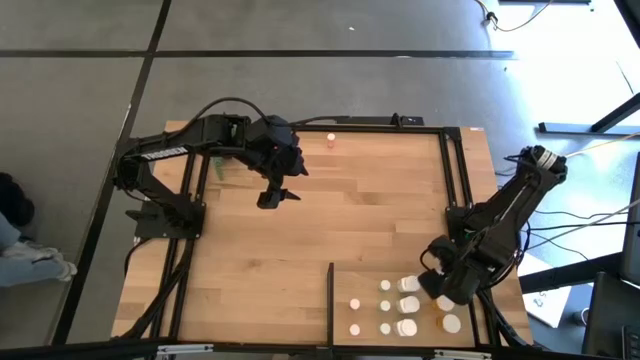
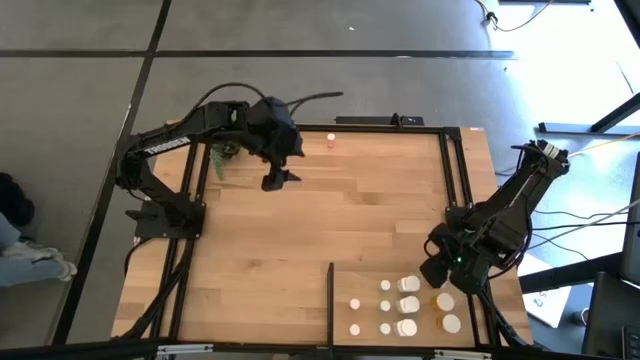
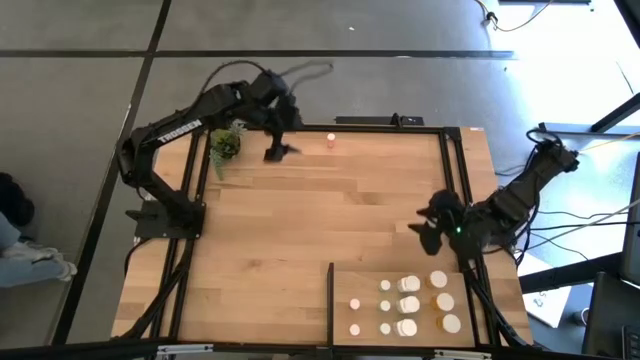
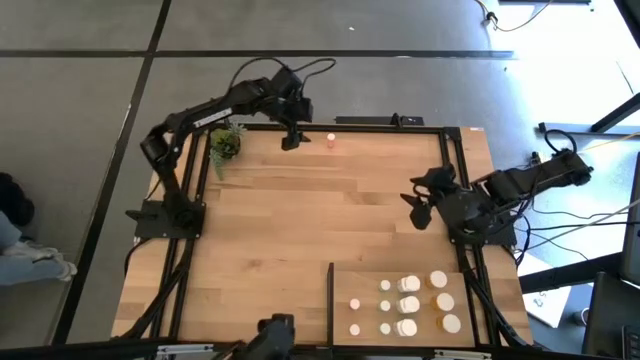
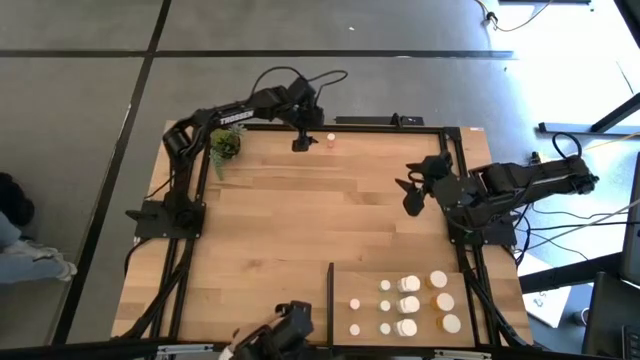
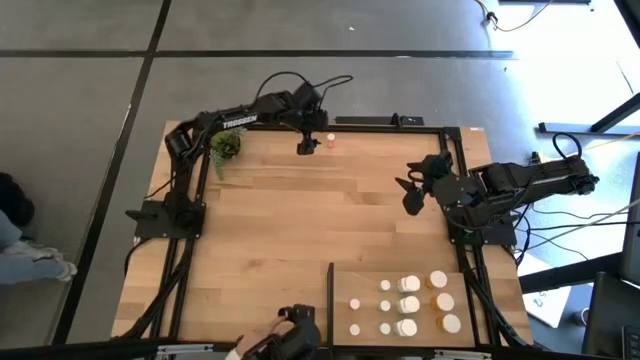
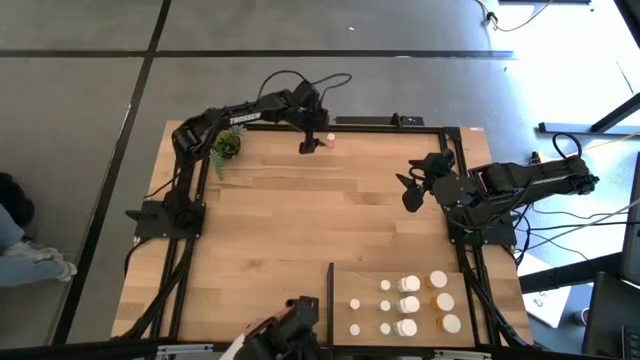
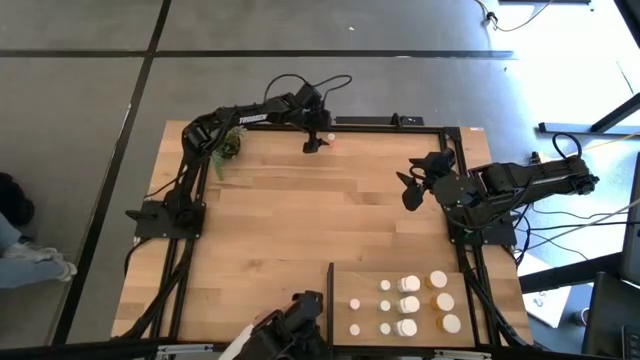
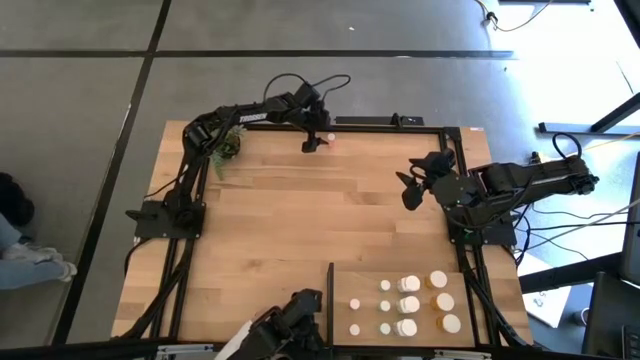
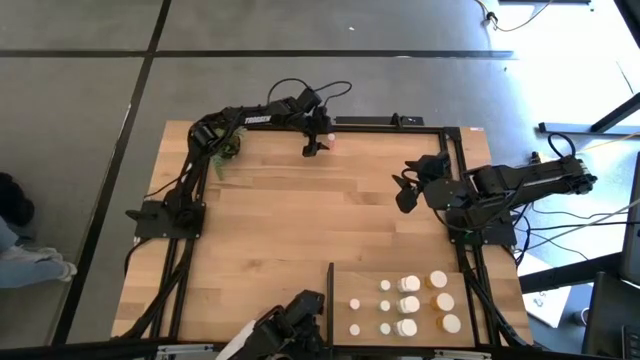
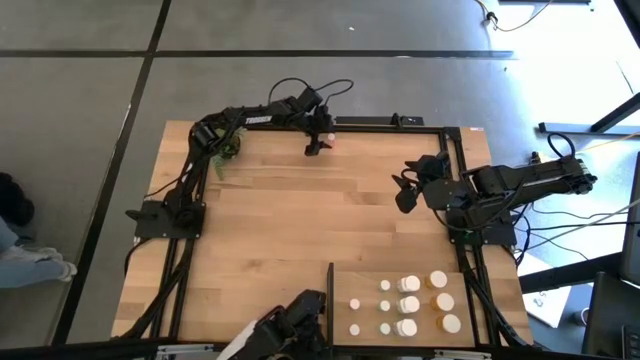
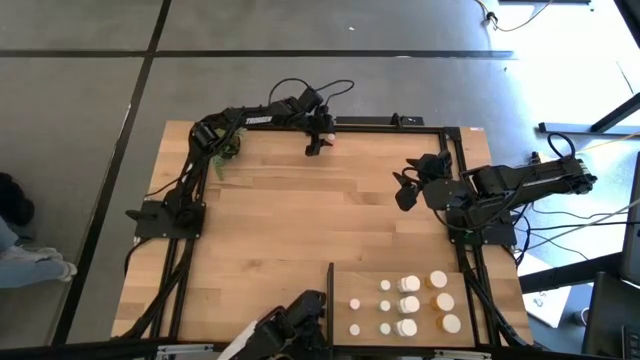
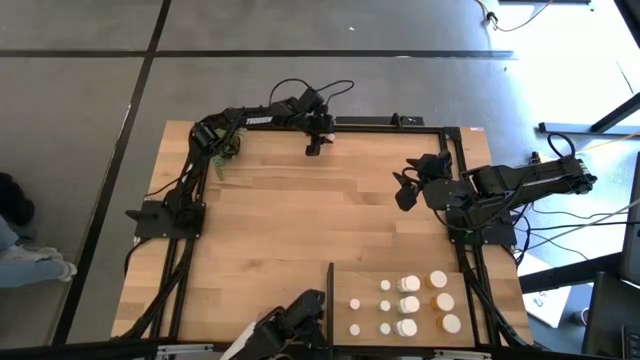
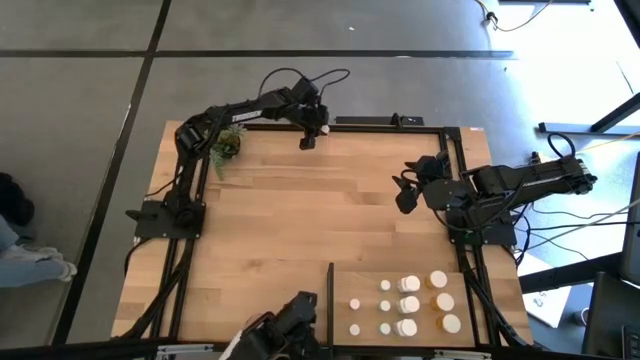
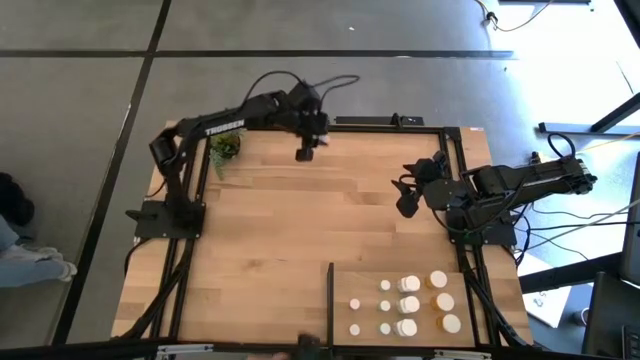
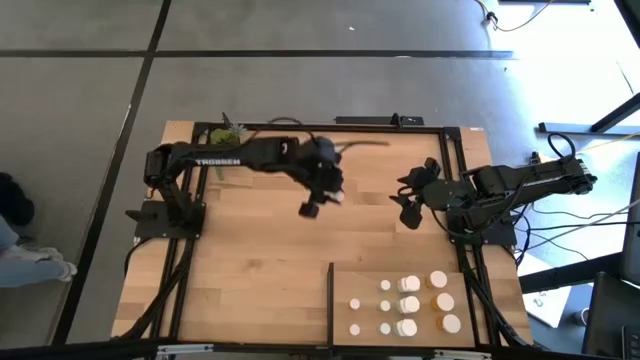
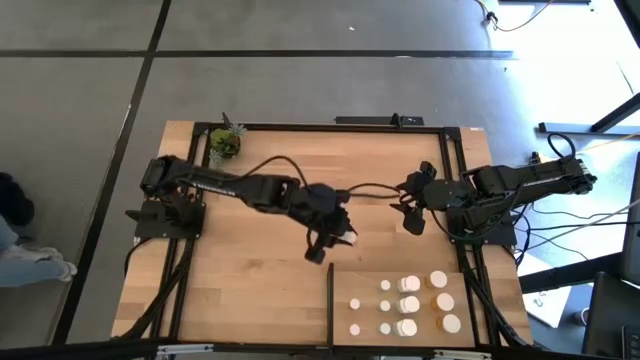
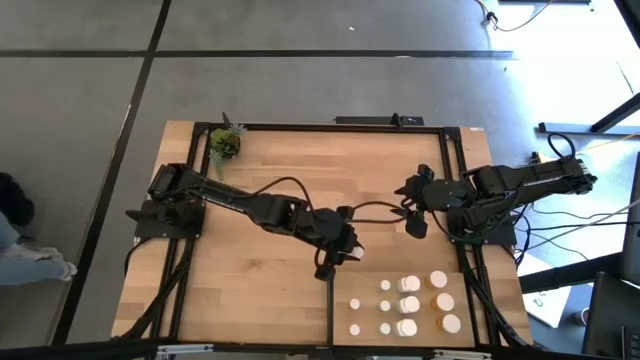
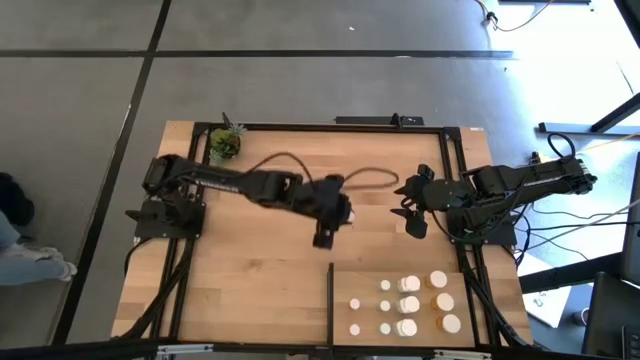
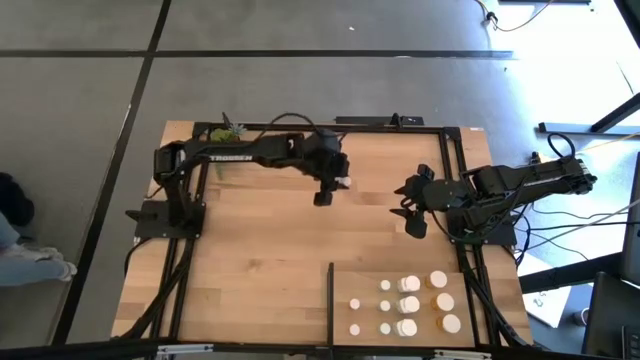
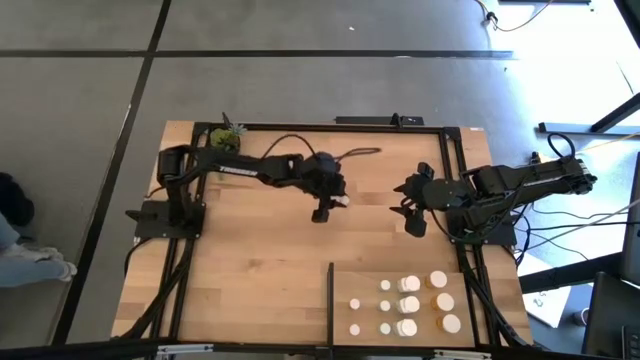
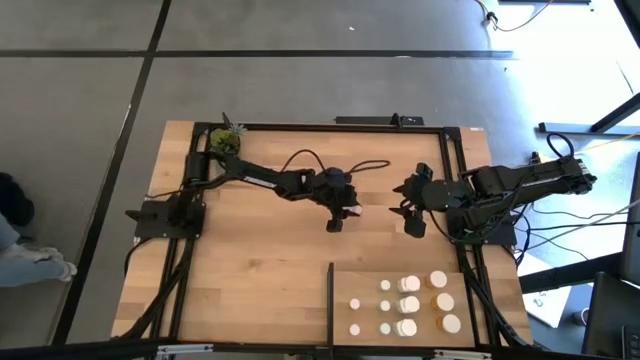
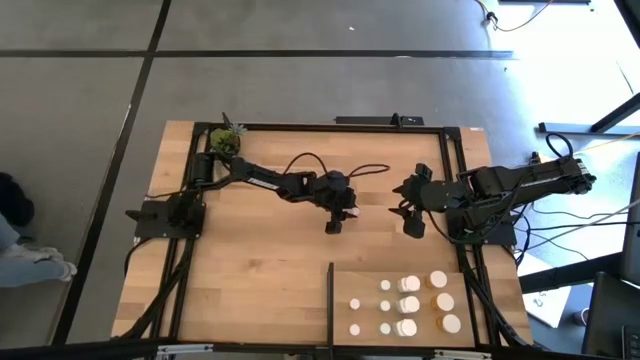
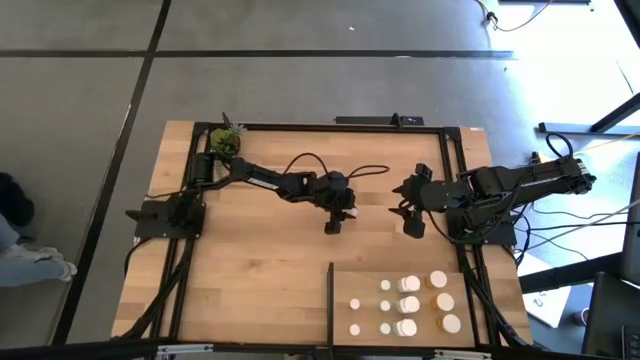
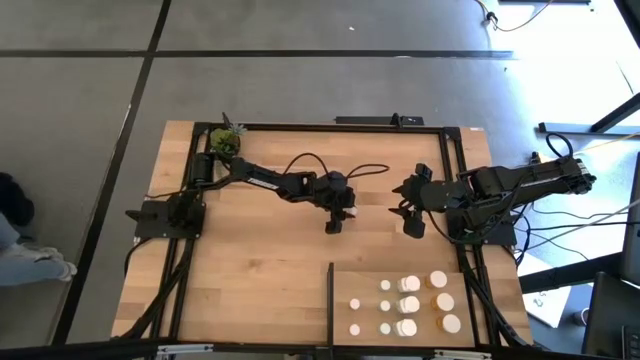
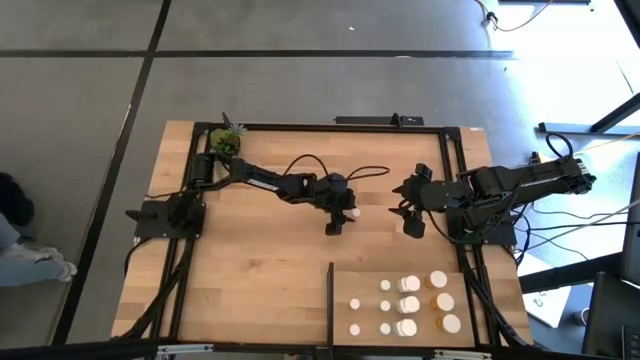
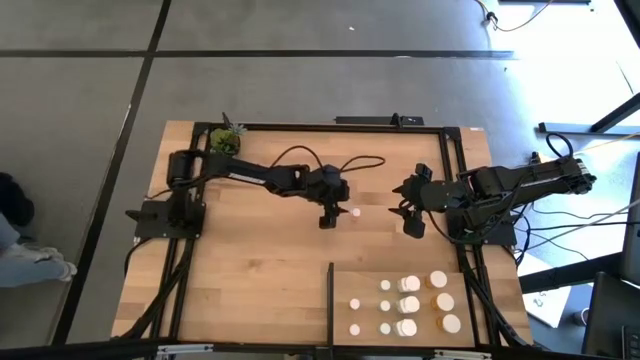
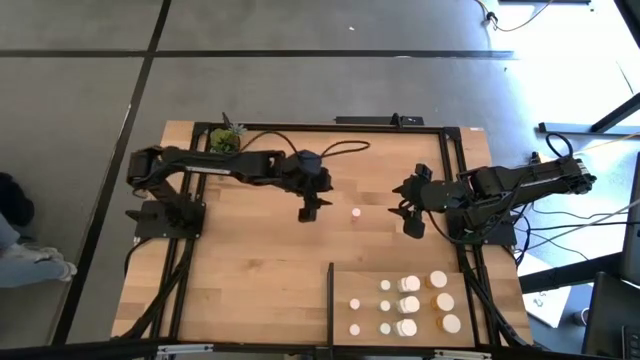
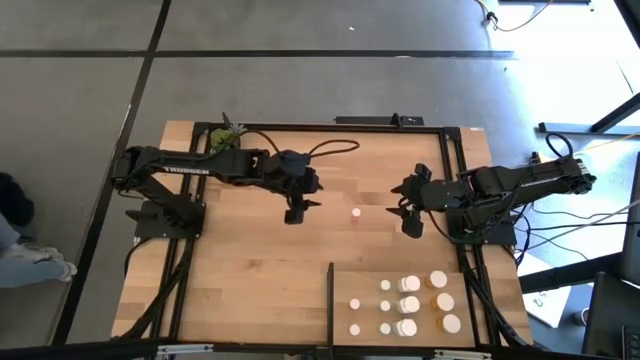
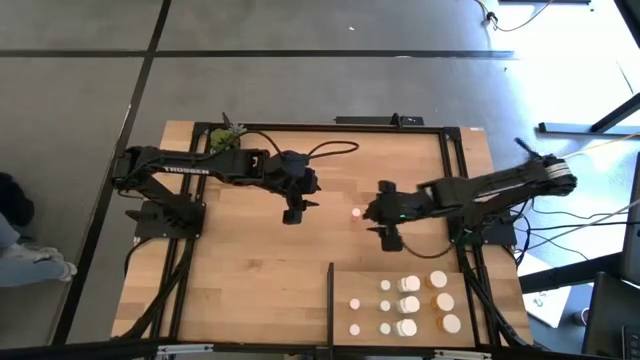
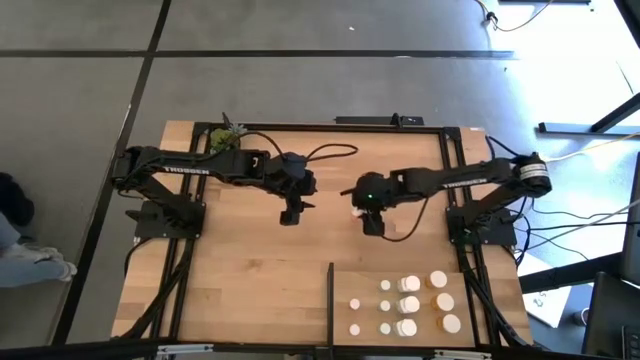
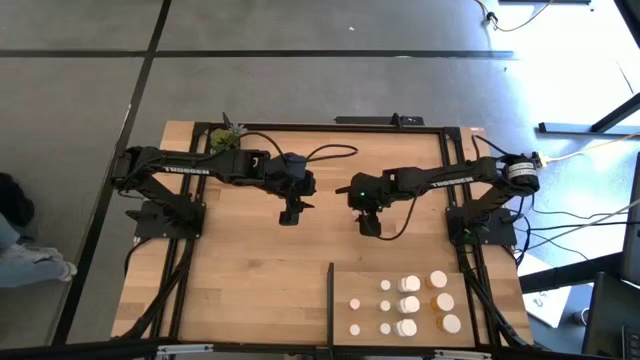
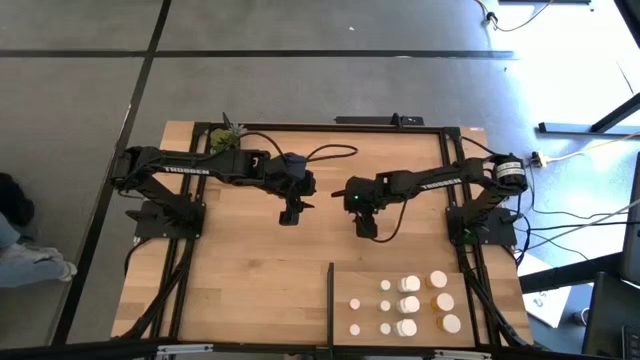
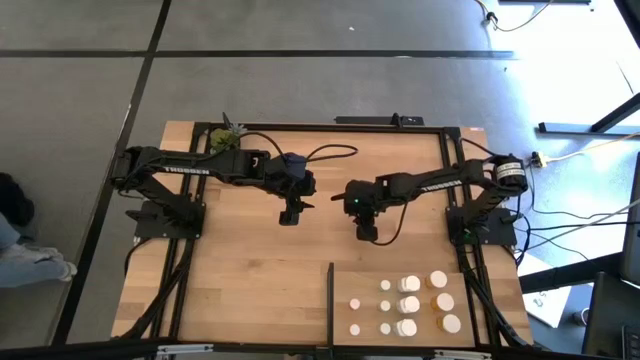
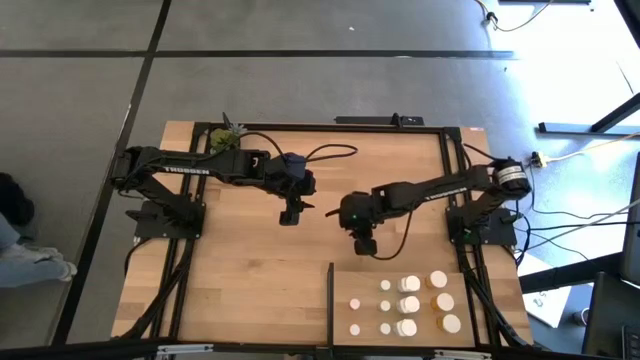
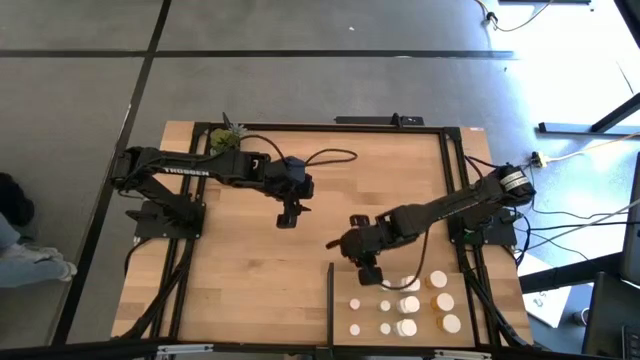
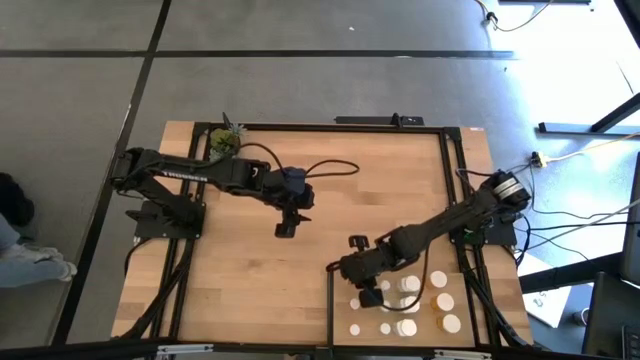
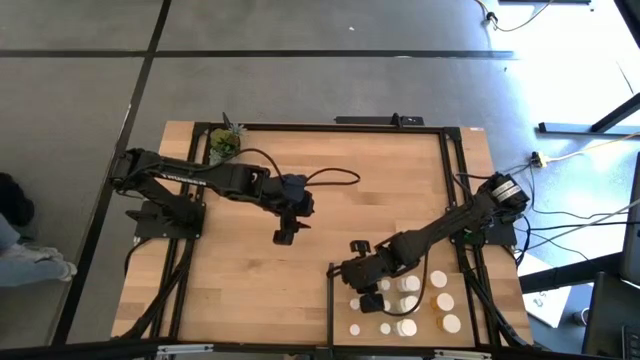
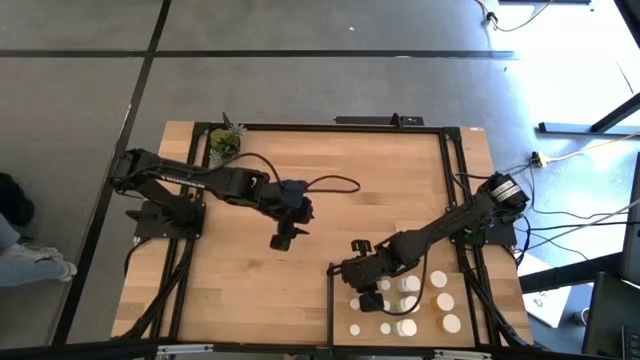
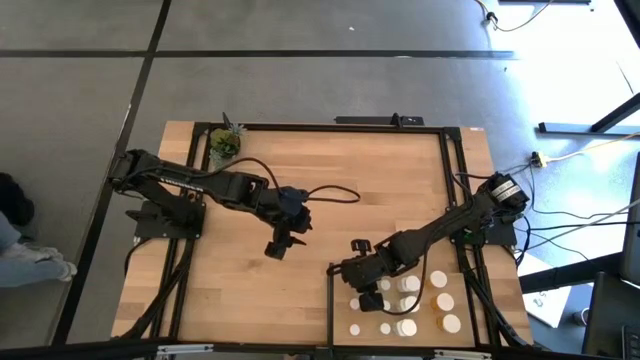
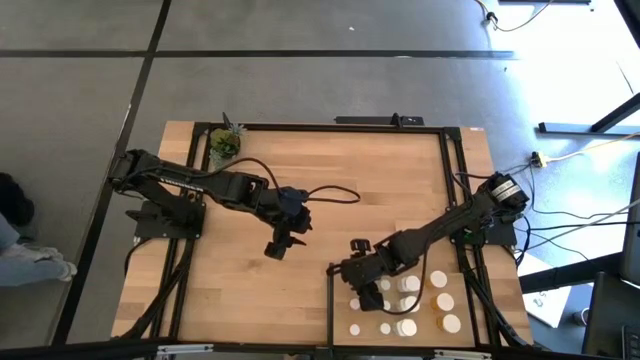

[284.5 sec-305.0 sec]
Task: Pick and place medicine bottles onto shelf by color
Put the pink pill bottle on the shelf aligned with the other pink pill bottles
